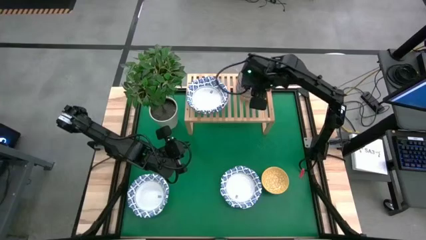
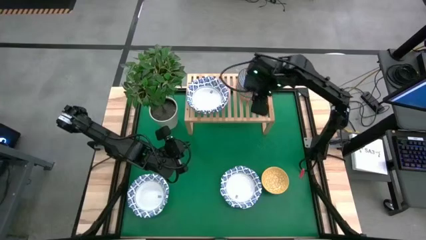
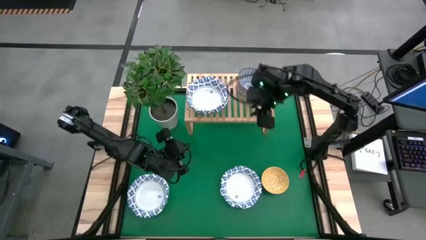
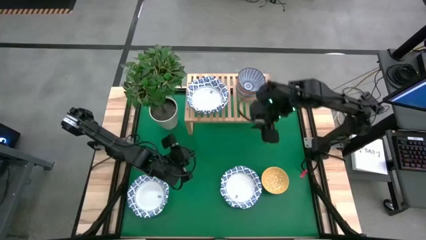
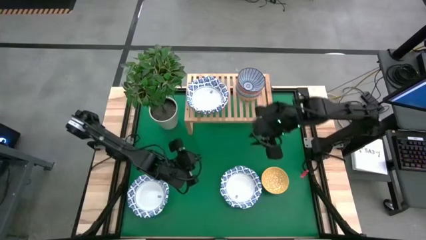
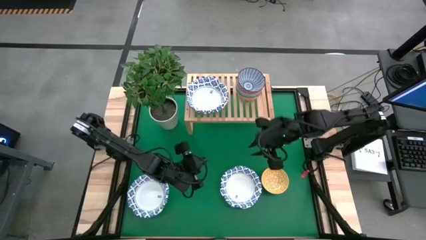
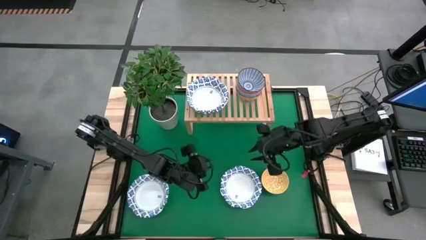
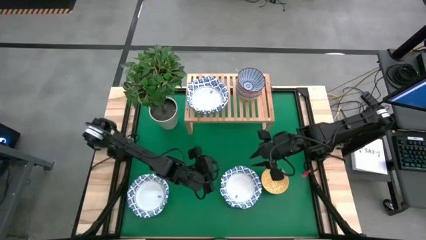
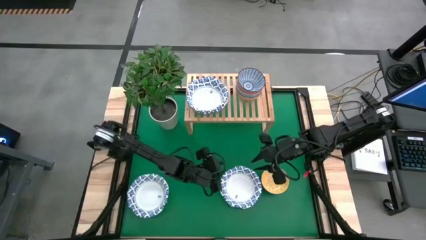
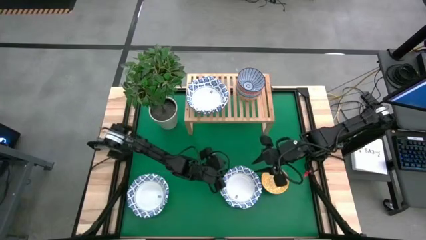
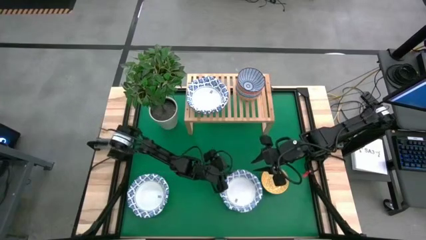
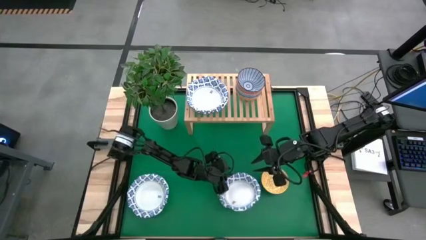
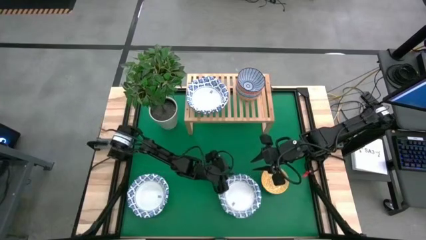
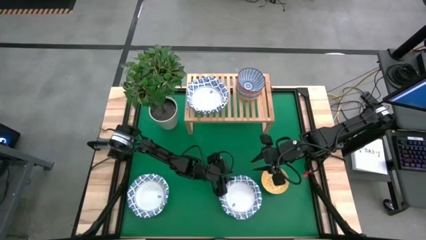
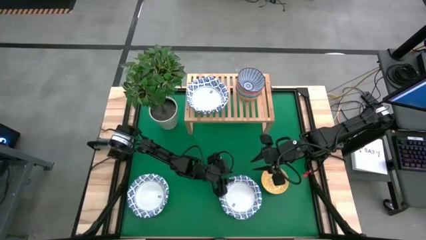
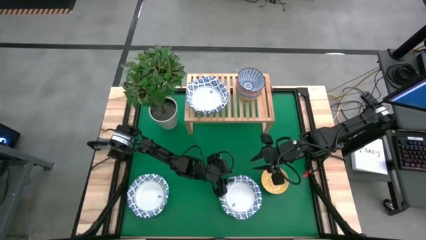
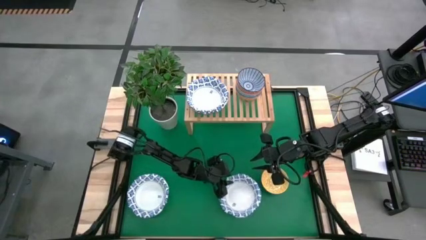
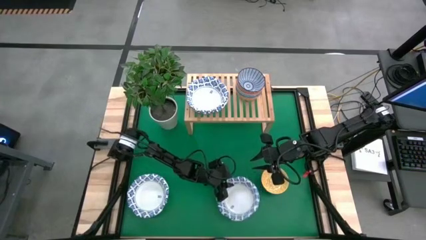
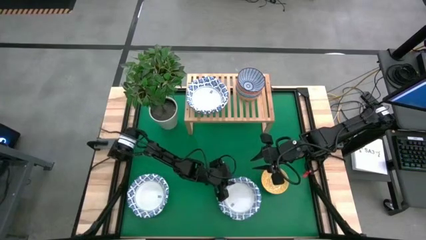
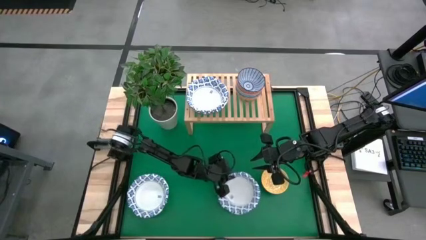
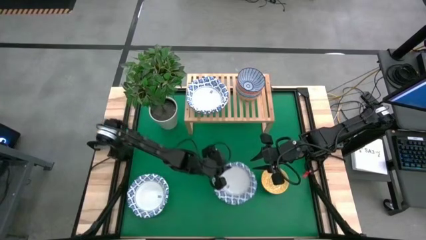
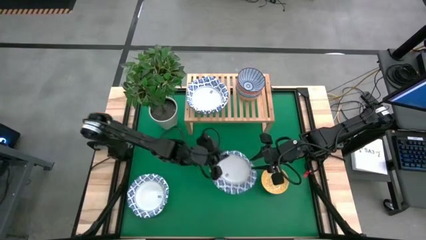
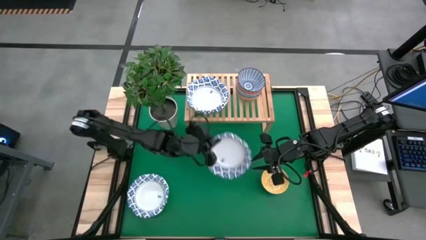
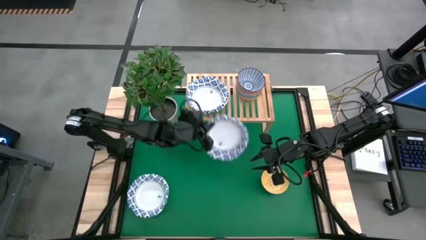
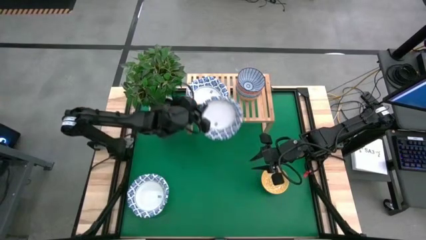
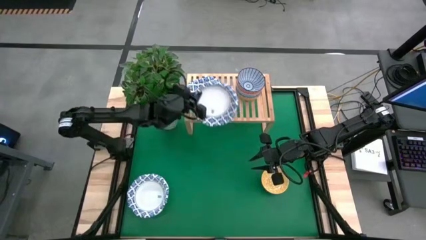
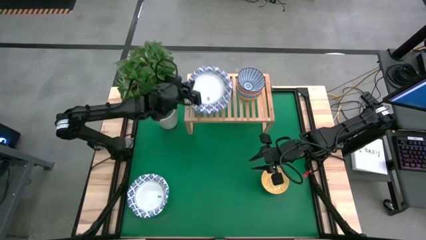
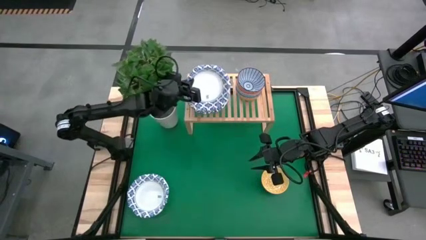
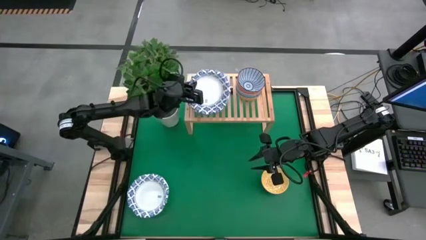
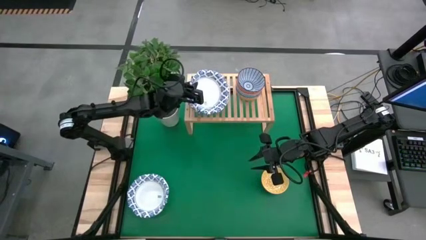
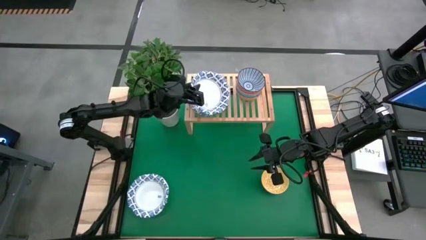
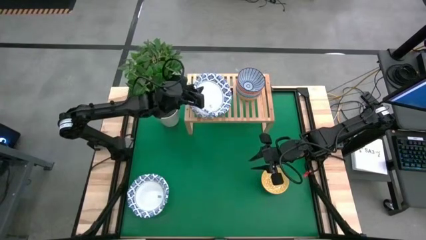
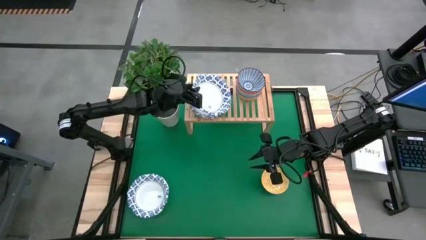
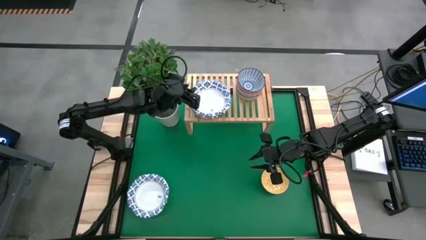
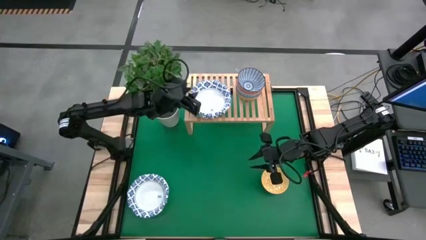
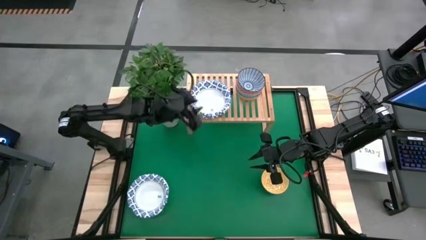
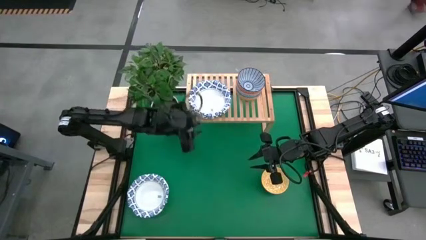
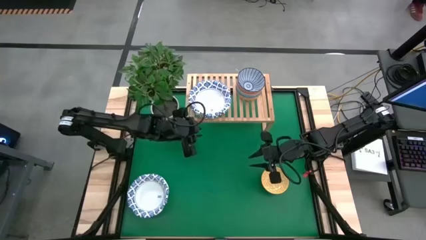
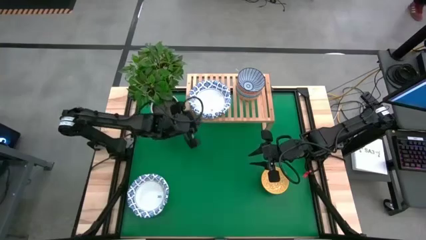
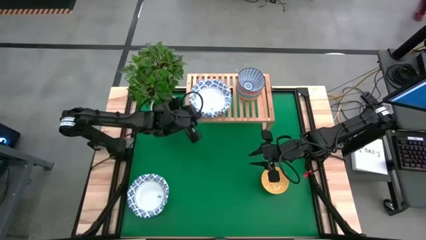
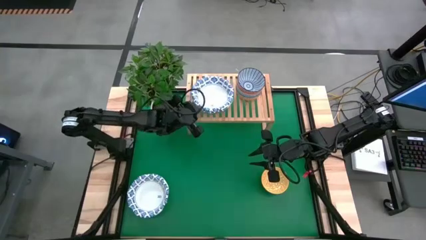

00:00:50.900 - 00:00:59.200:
Task: Place and stack bowls onto a shelf
Stack the blue/white bowl on top of the blue/white bowl on the shelf

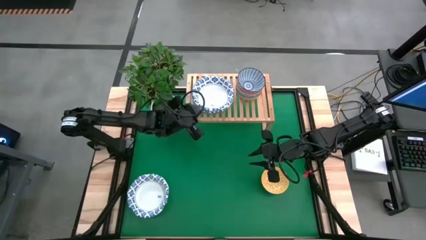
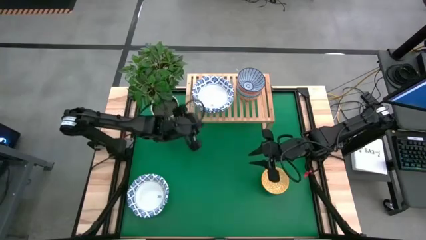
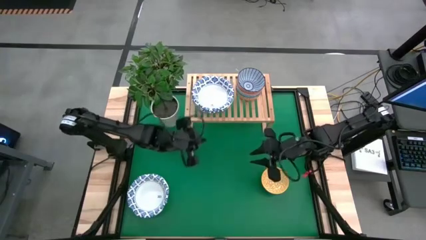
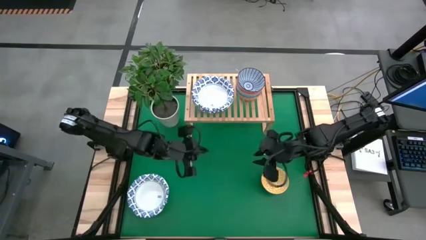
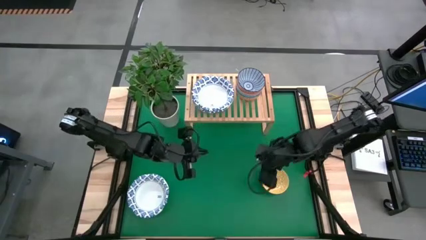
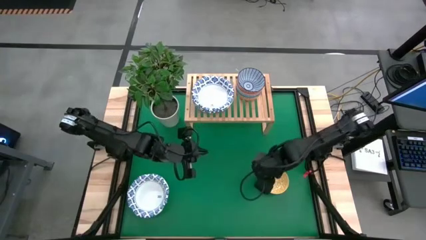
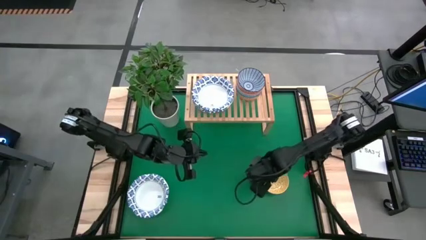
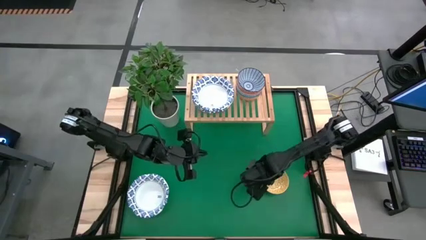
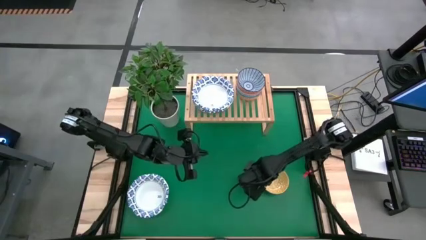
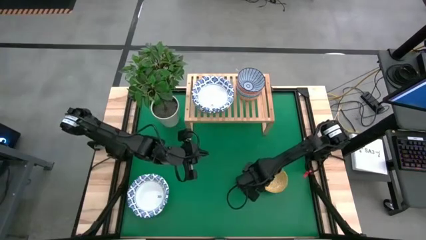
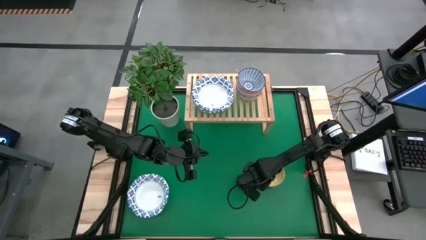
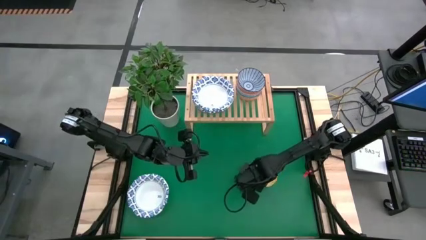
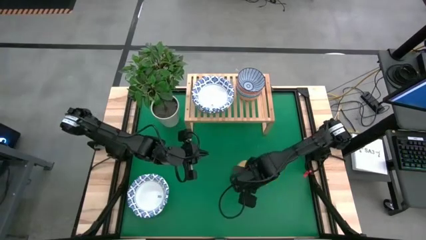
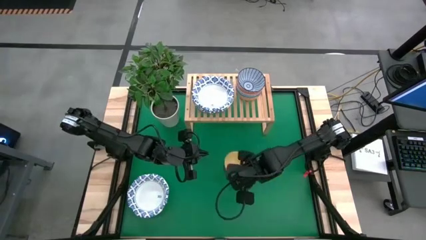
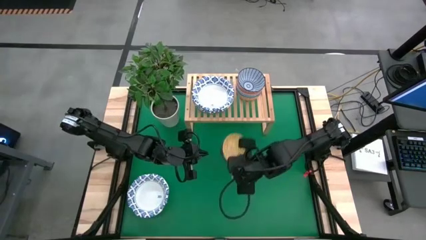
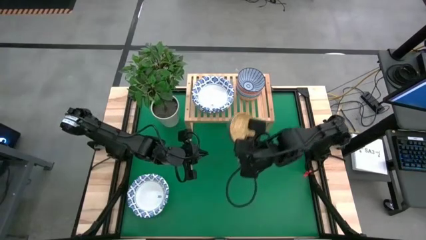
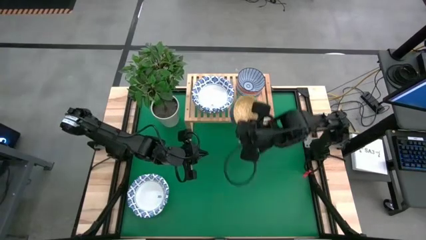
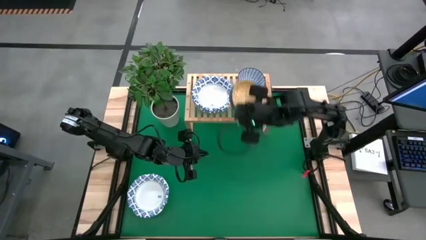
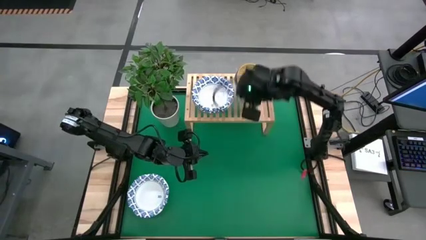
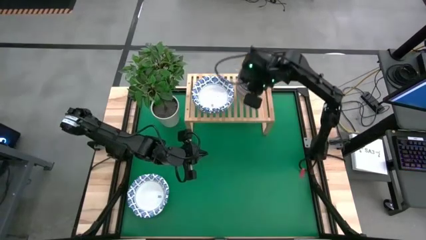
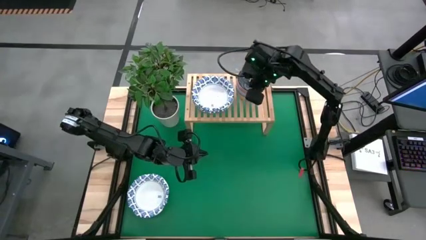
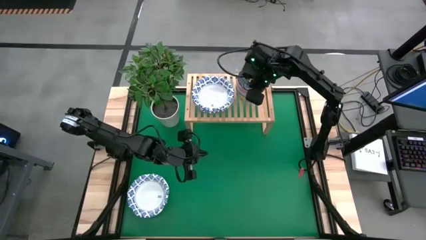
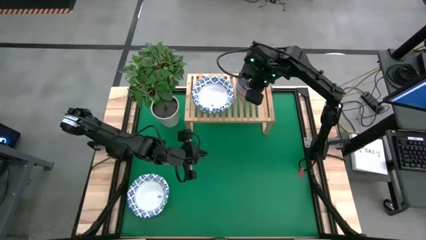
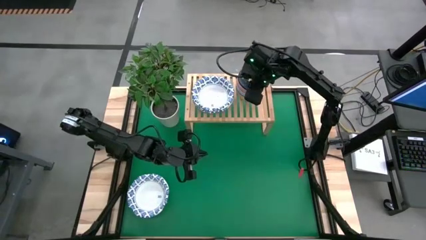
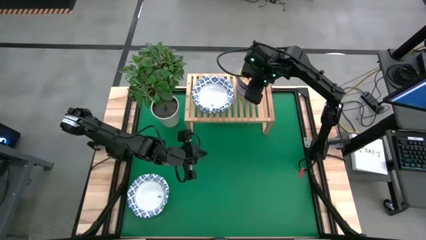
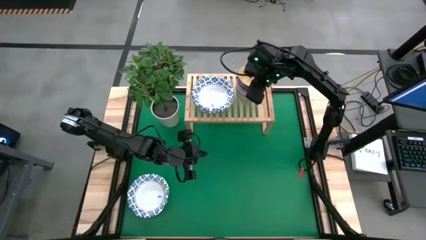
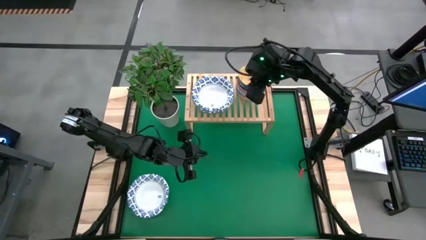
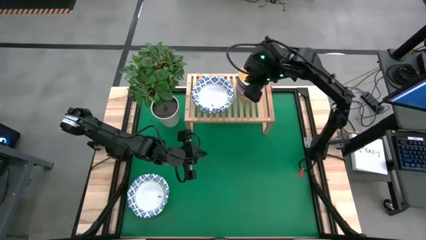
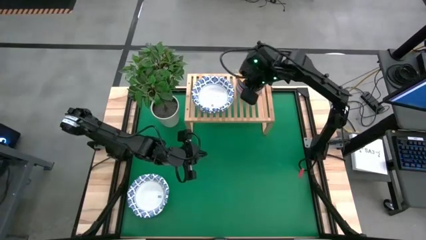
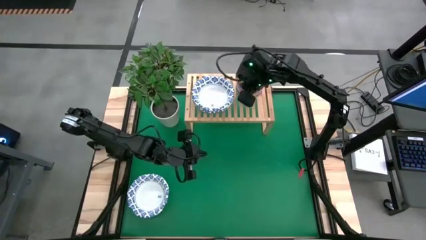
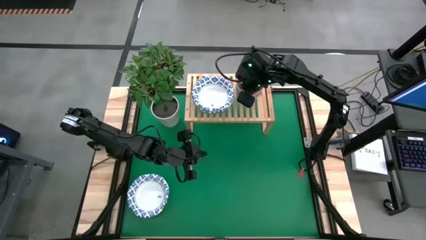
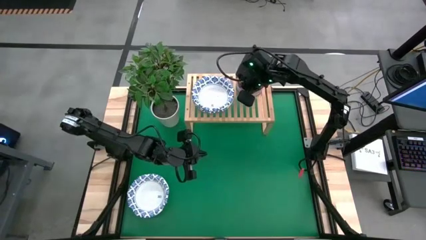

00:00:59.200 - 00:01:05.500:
Stack the light orange bowl on top of the blue bowl on the shelf
